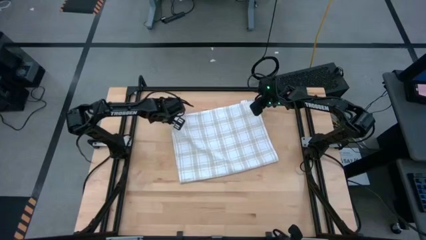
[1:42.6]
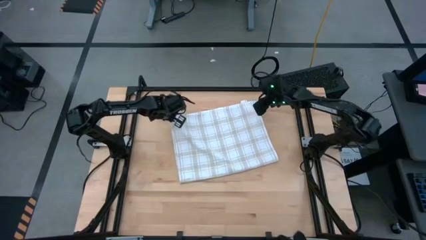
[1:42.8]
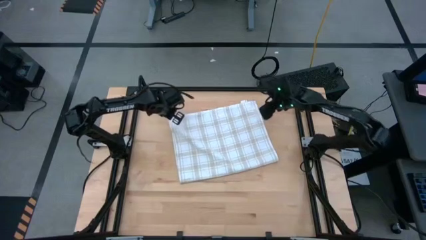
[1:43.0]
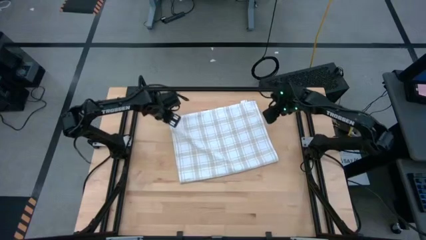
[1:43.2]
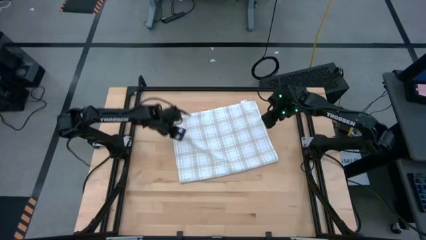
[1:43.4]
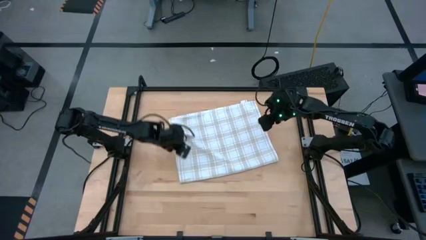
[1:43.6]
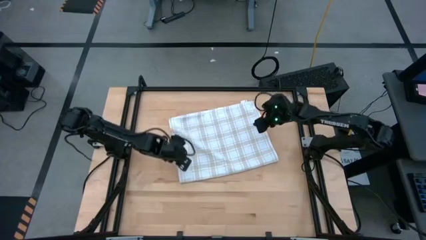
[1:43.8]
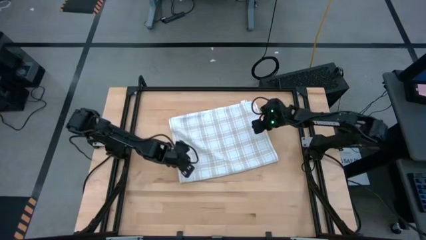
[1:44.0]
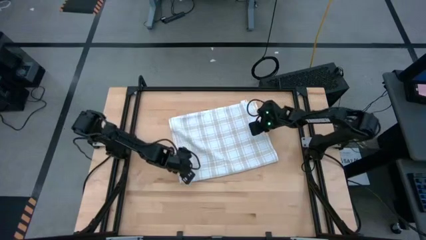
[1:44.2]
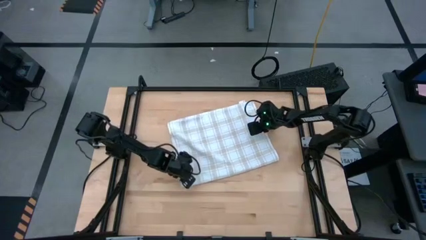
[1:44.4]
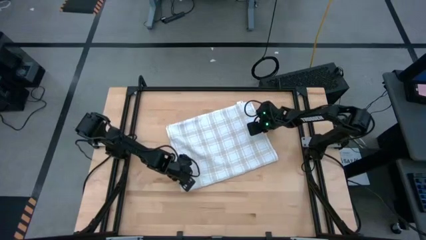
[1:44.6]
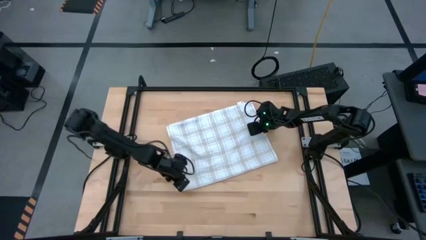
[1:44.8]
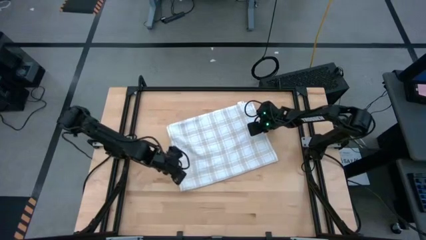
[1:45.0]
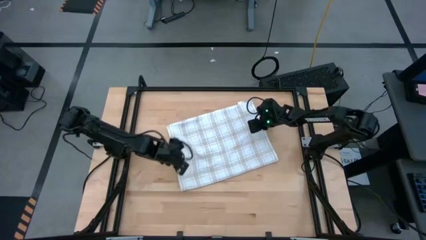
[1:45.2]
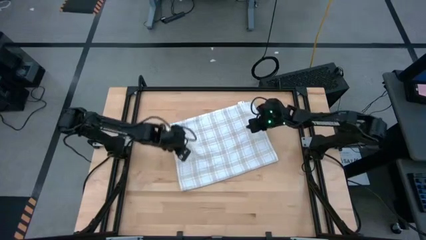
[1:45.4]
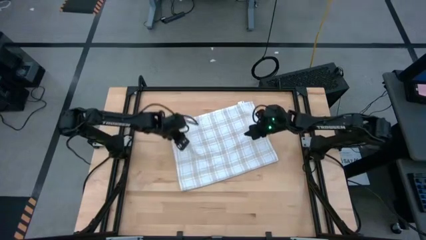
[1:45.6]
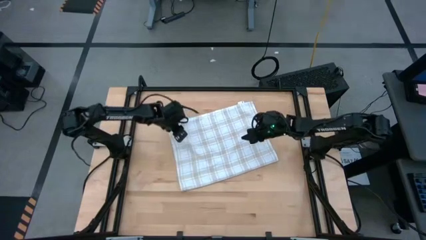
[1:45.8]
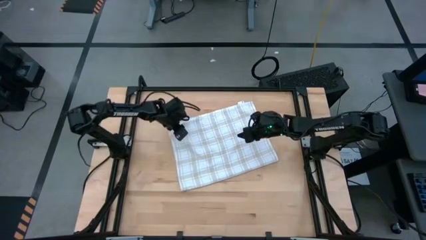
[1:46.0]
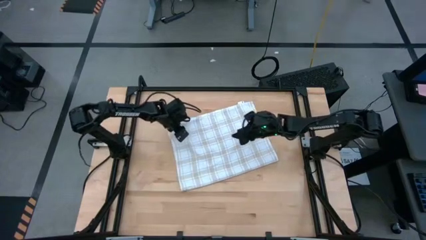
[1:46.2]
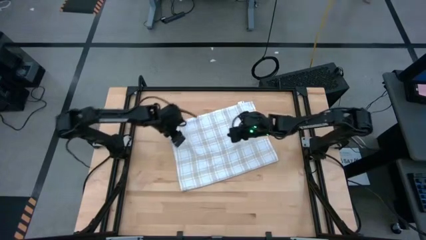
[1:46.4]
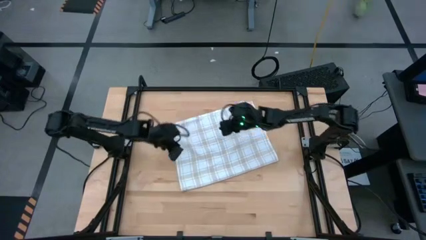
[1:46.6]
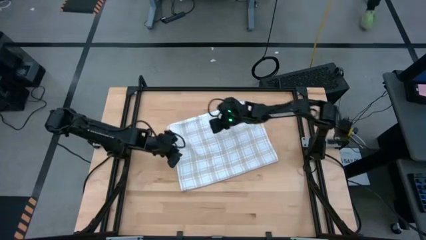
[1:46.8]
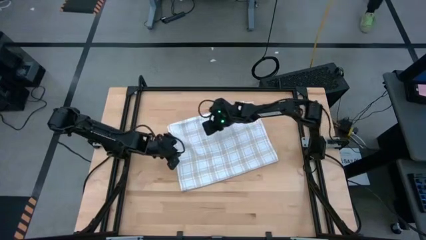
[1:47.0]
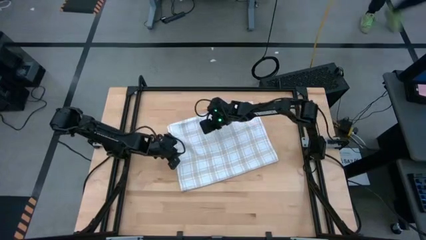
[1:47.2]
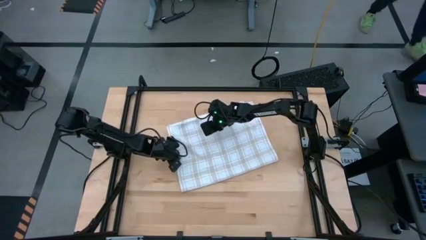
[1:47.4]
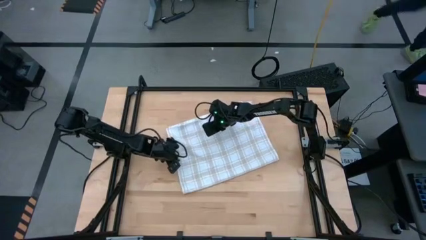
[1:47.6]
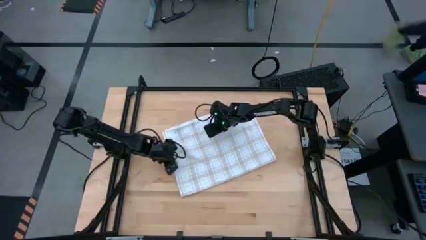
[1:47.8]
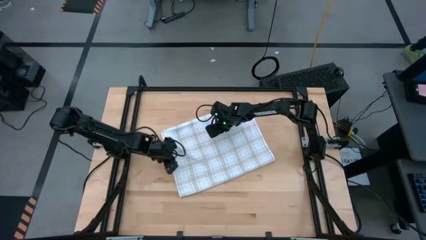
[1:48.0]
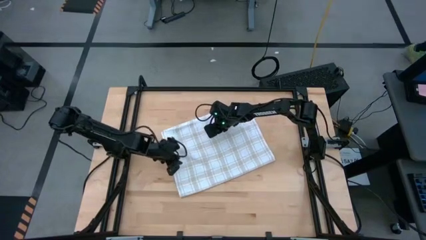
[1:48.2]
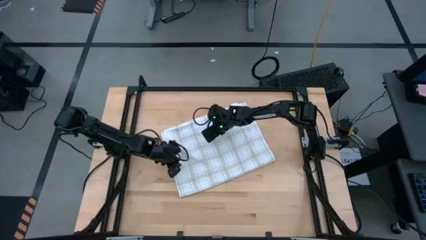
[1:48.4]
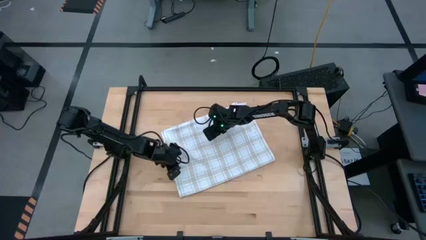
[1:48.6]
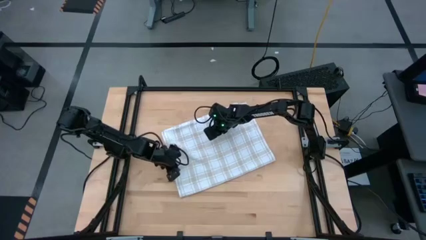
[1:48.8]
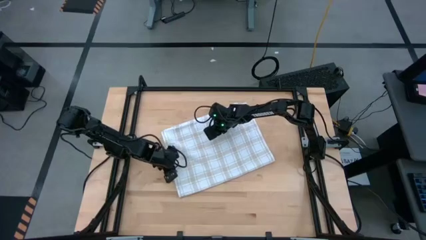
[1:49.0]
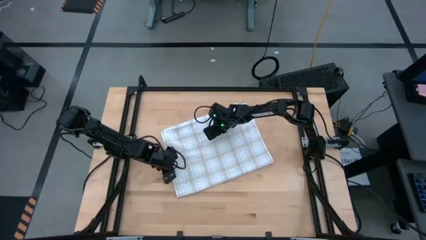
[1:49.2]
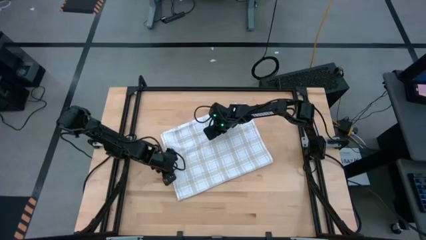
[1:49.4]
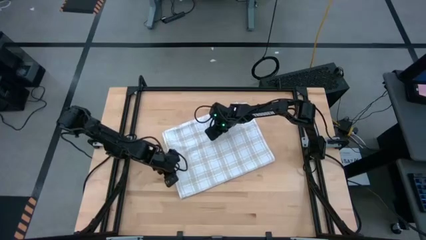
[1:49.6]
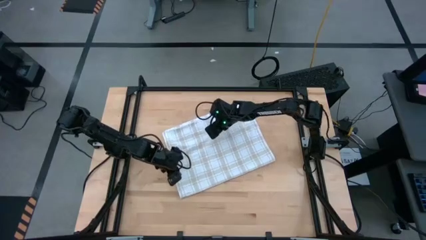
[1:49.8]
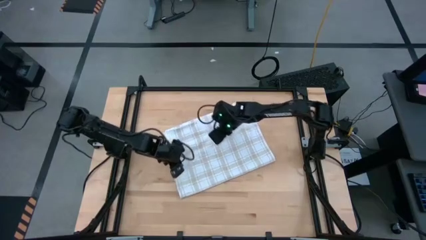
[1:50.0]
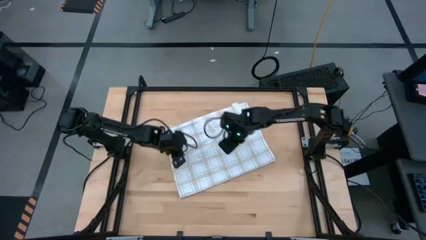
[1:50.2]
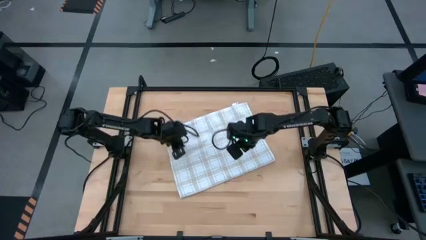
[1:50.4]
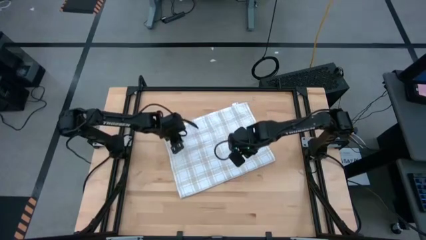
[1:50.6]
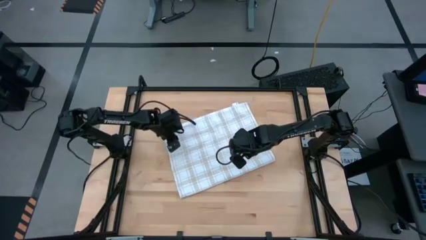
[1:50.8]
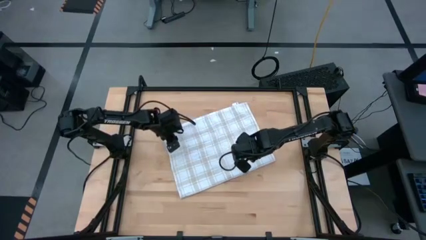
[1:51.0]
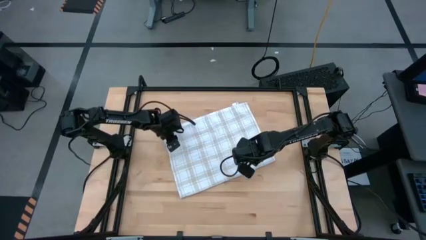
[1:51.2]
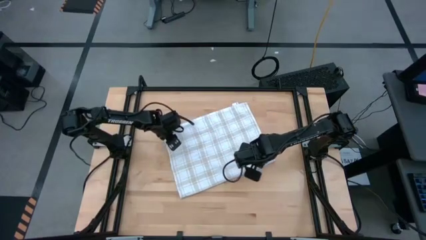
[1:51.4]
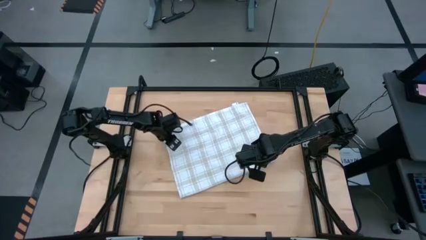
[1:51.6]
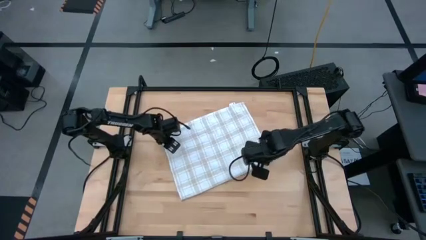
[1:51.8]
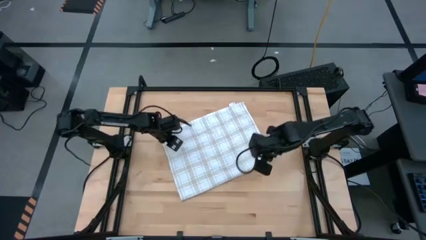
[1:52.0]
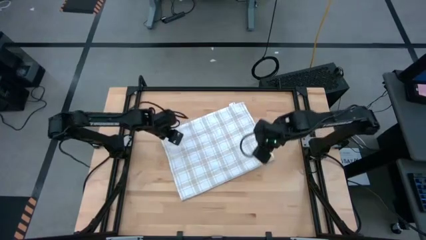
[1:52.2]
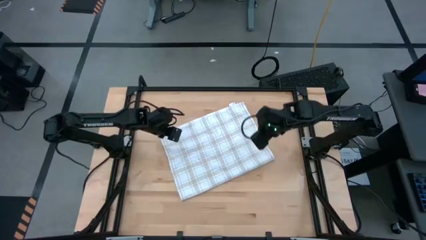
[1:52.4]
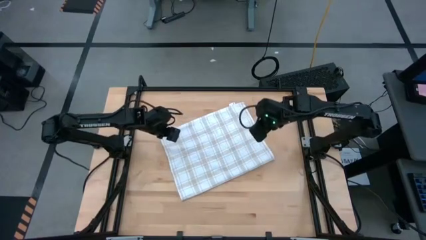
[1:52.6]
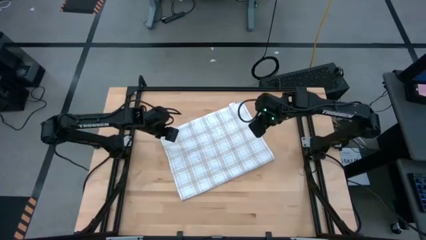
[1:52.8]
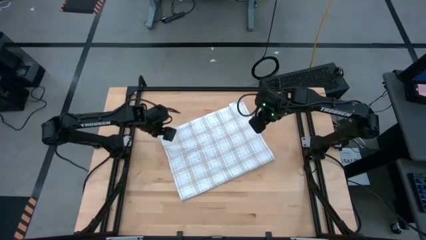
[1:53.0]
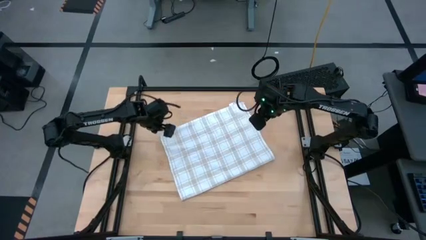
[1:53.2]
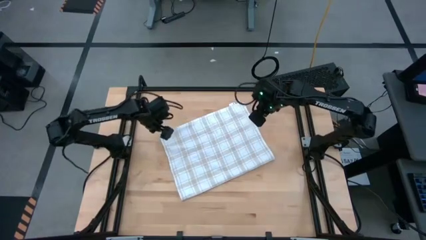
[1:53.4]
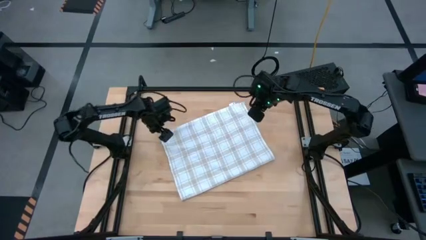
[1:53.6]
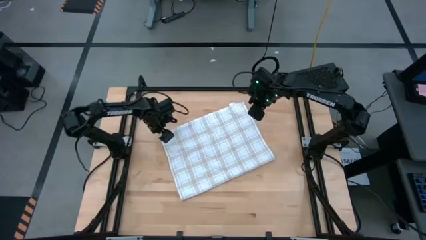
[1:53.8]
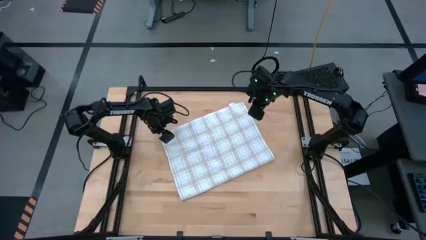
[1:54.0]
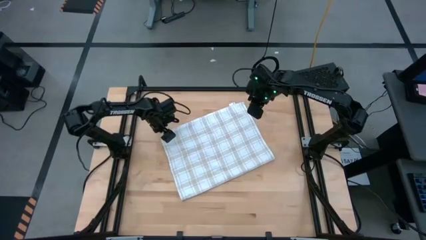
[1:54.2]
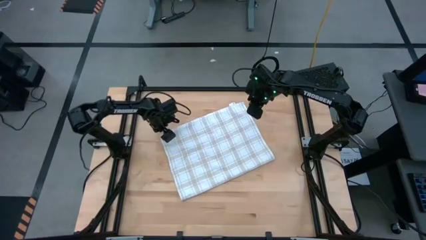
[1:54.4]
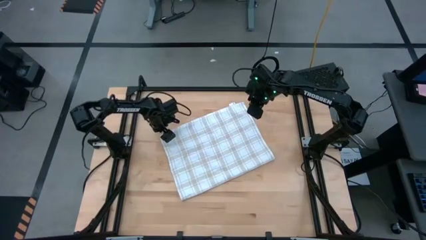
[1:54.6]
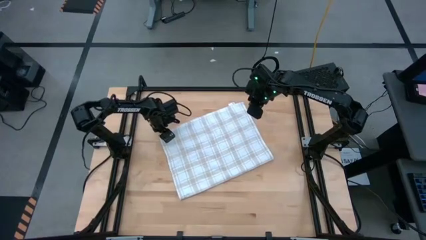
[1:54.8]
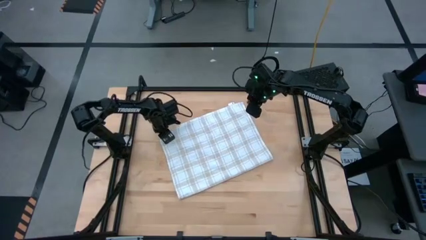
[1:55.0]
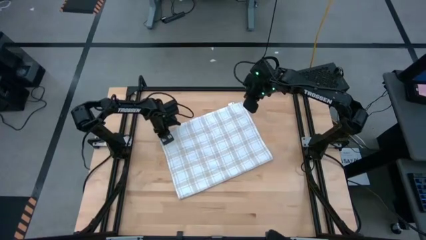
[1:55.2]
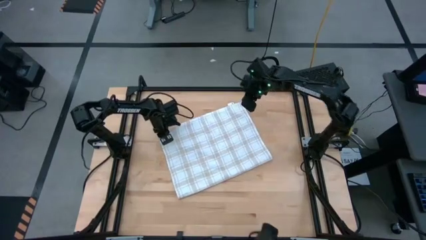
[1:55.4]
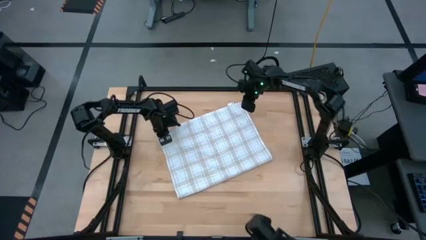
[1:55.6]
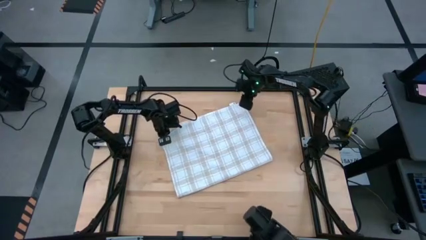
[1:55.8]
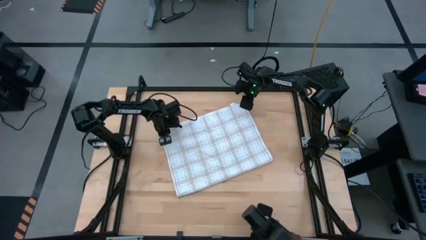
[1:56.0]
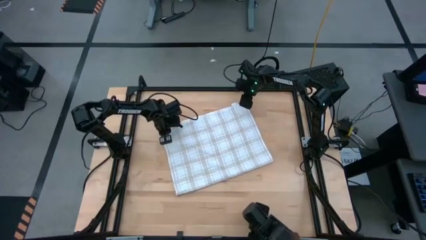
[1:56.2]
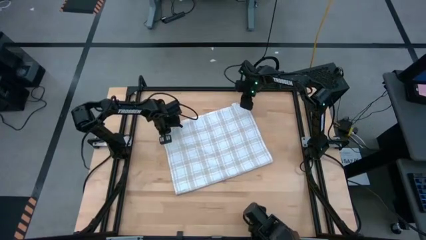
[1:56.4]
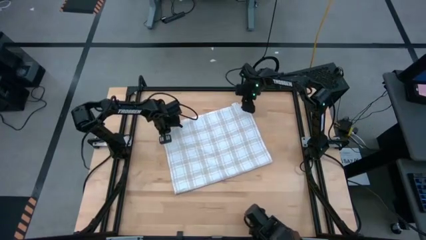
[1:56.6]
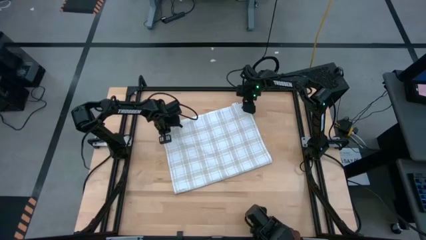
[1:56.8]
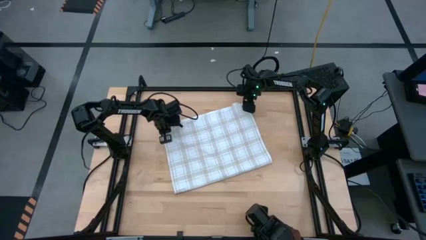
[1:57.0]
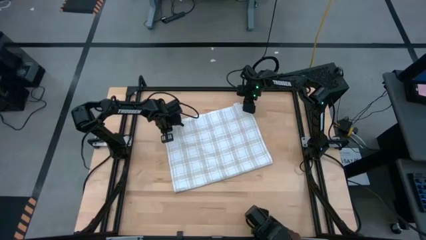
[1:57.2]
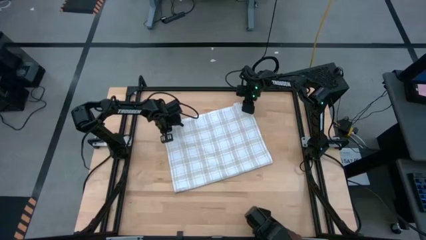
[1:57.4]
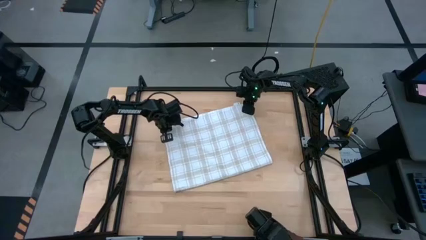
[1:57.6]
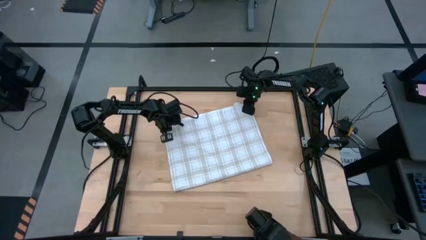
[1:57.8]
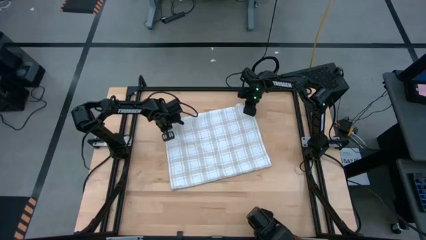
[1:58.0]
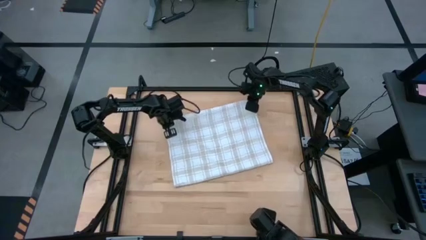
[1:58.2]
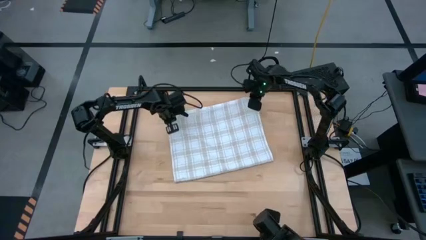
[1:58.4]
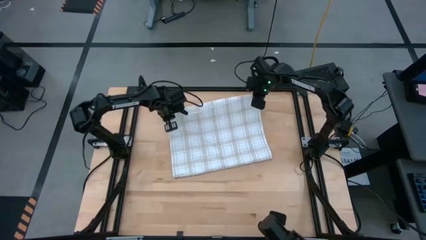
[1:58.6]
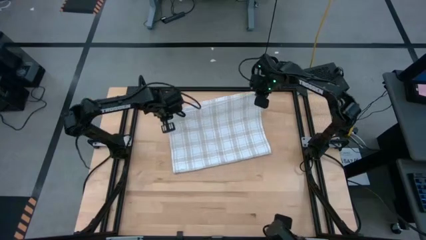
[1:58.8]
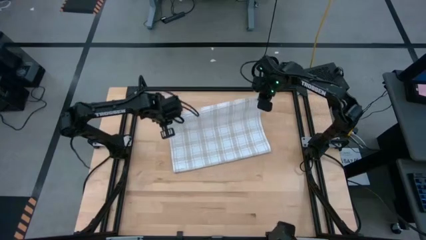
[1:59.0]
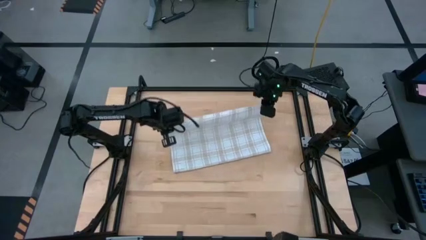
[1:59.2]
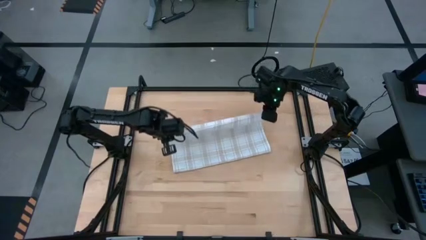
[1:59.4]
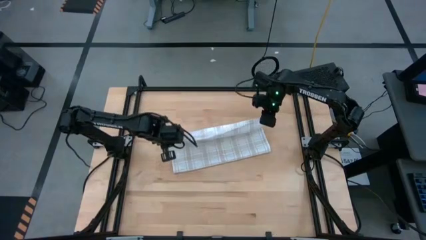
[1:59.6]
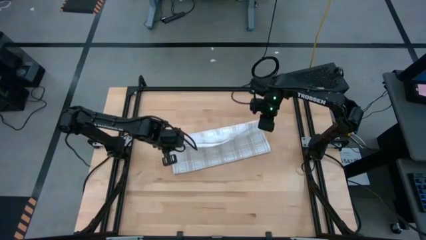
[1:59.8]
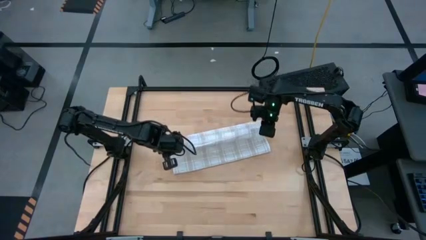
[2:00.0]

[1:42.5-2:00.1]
Task: Roll towel
Roll the towel
